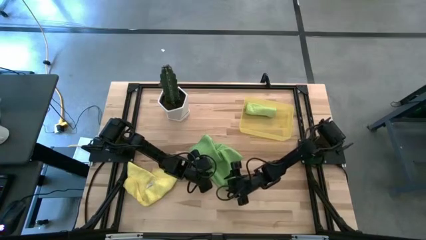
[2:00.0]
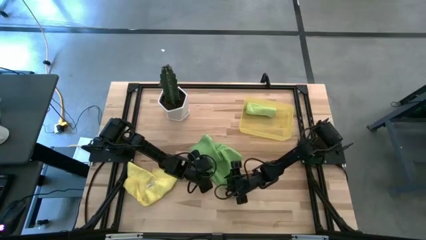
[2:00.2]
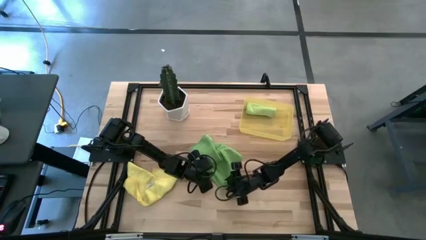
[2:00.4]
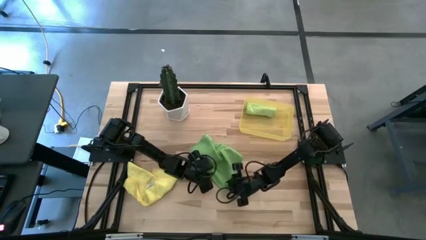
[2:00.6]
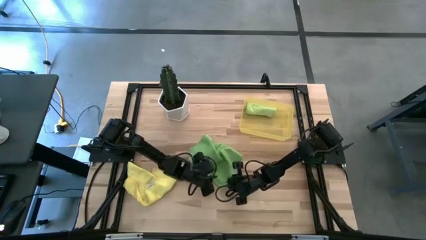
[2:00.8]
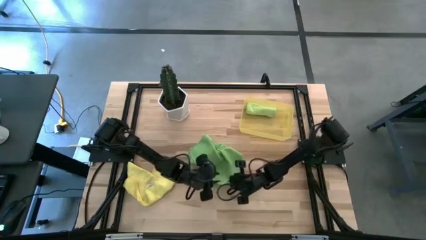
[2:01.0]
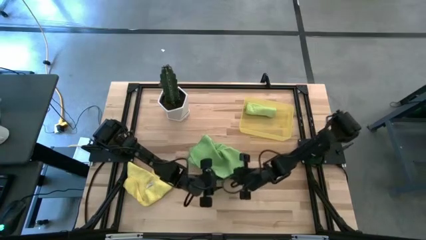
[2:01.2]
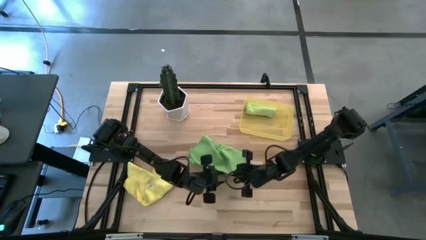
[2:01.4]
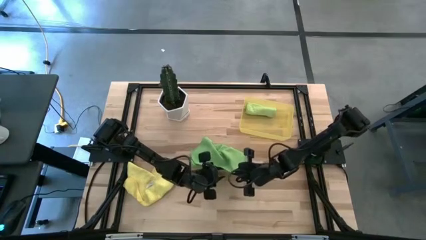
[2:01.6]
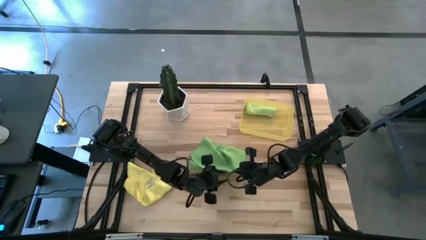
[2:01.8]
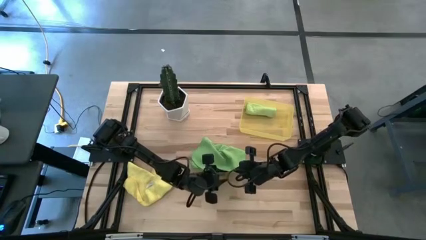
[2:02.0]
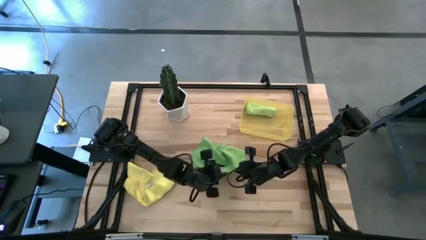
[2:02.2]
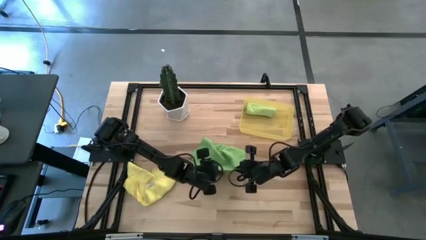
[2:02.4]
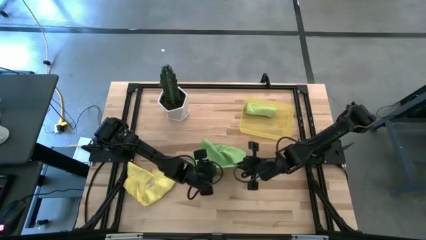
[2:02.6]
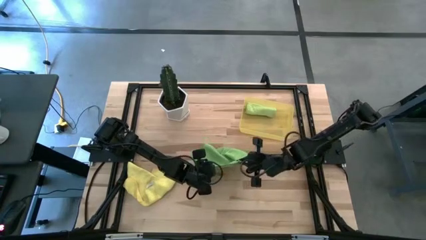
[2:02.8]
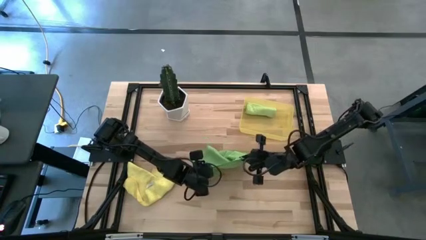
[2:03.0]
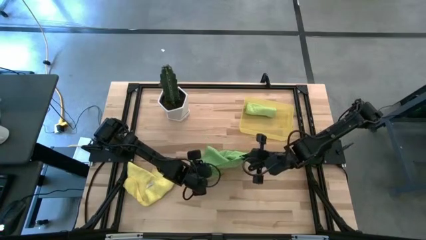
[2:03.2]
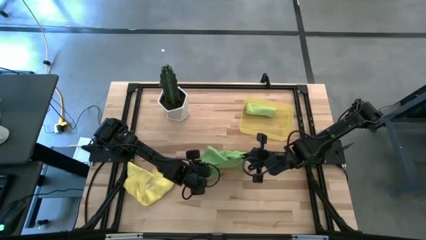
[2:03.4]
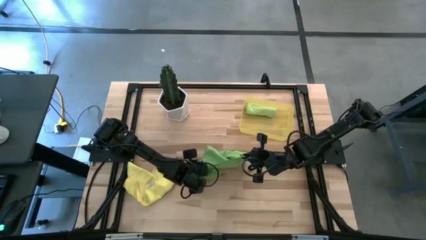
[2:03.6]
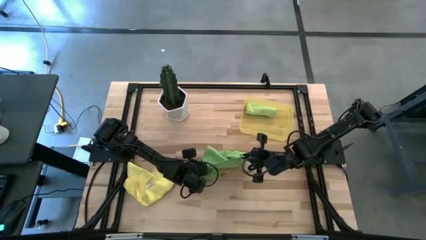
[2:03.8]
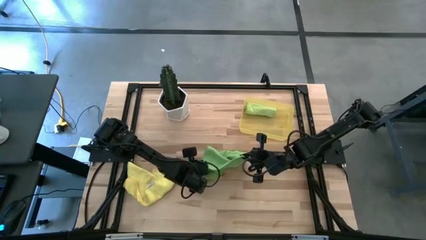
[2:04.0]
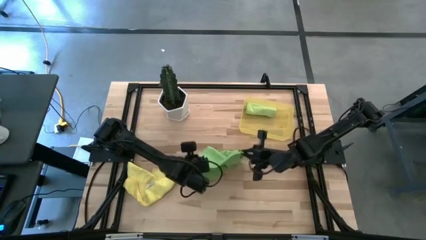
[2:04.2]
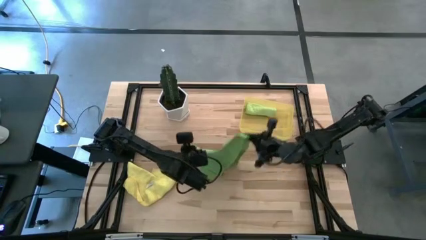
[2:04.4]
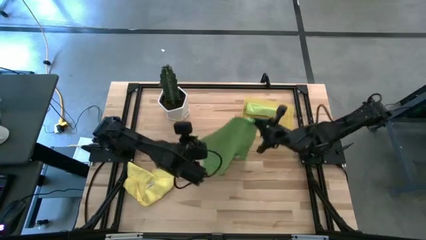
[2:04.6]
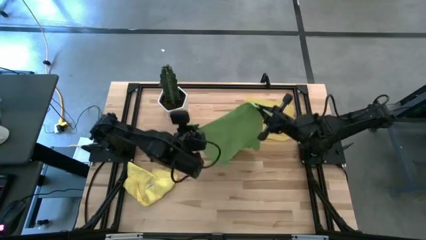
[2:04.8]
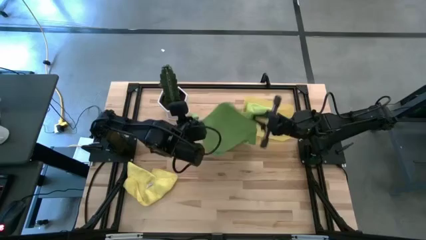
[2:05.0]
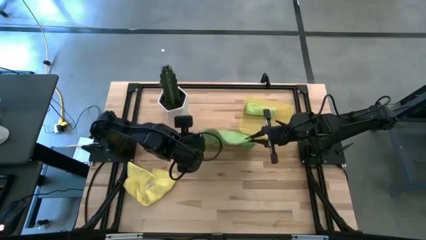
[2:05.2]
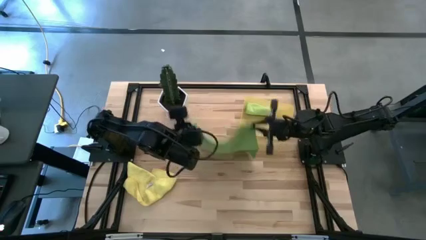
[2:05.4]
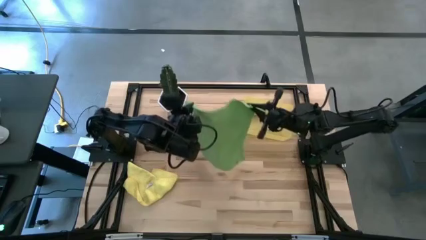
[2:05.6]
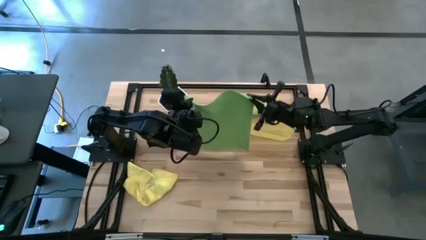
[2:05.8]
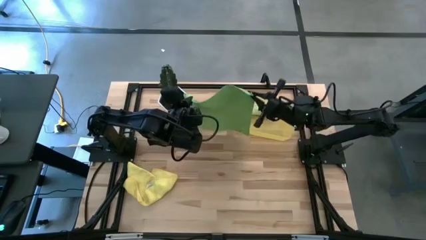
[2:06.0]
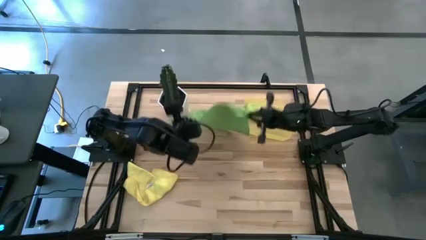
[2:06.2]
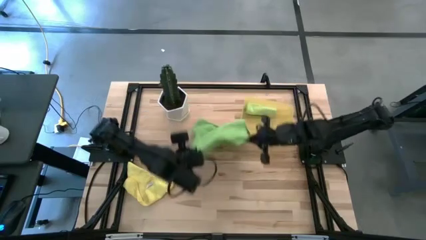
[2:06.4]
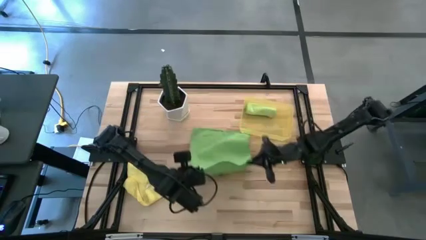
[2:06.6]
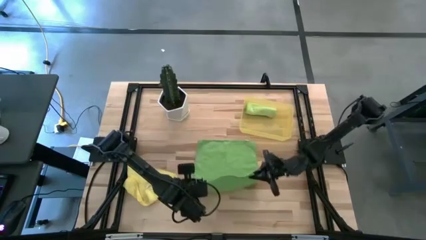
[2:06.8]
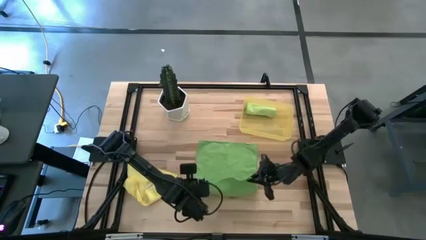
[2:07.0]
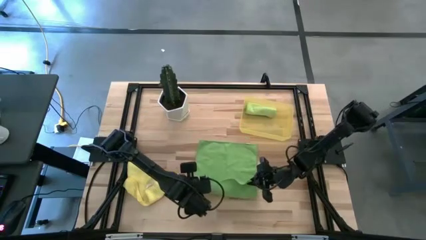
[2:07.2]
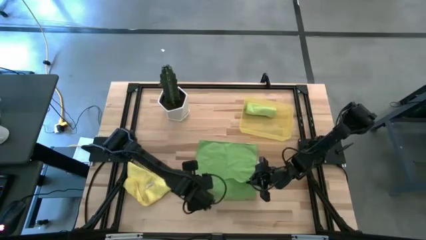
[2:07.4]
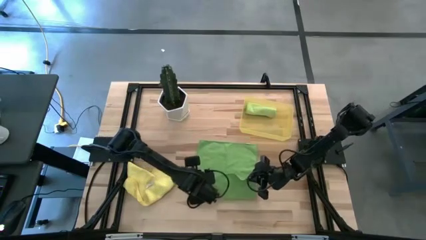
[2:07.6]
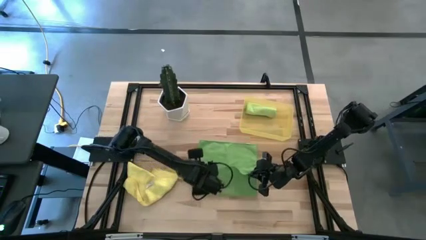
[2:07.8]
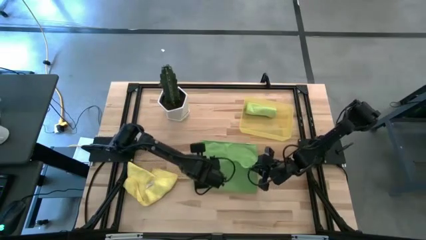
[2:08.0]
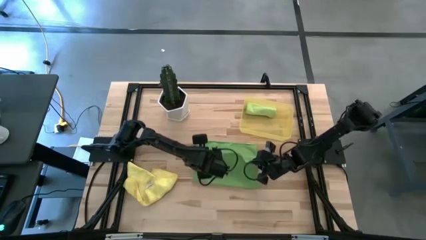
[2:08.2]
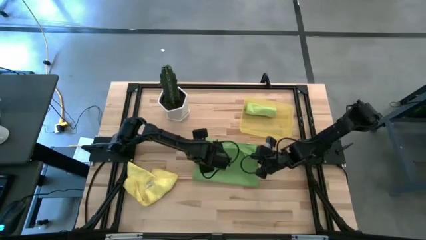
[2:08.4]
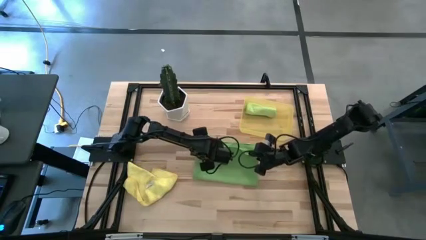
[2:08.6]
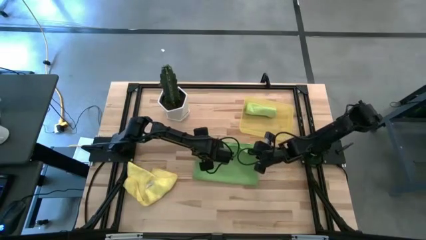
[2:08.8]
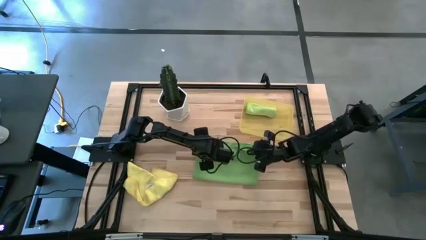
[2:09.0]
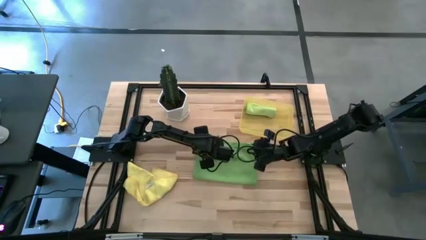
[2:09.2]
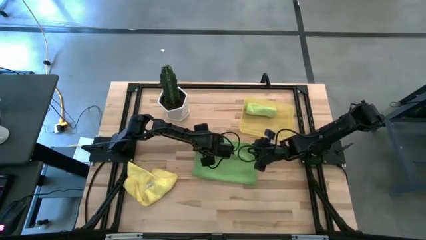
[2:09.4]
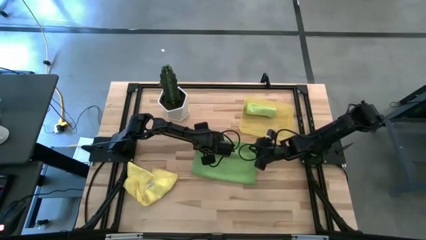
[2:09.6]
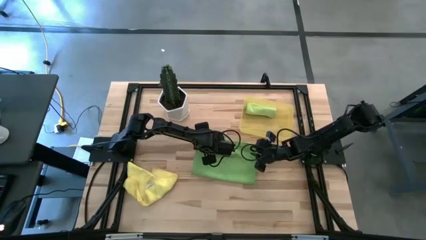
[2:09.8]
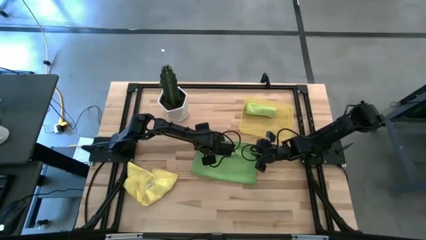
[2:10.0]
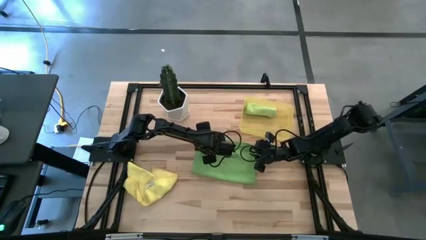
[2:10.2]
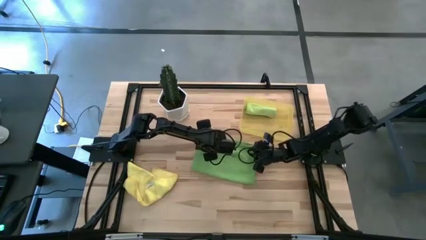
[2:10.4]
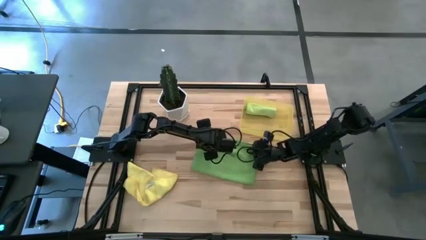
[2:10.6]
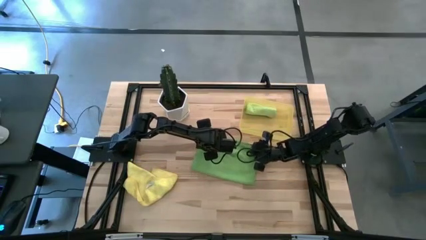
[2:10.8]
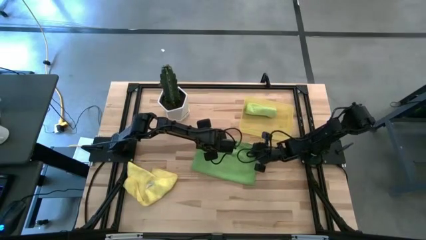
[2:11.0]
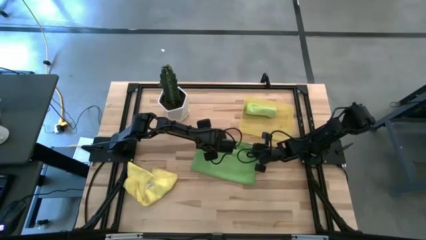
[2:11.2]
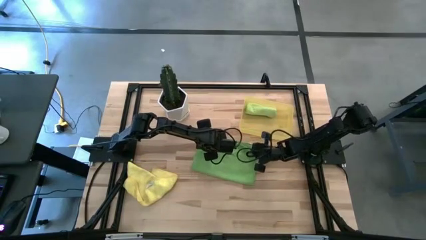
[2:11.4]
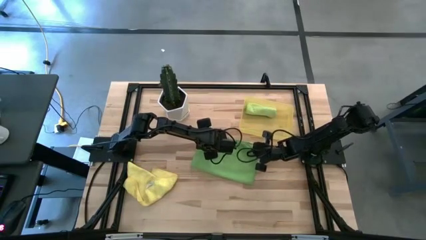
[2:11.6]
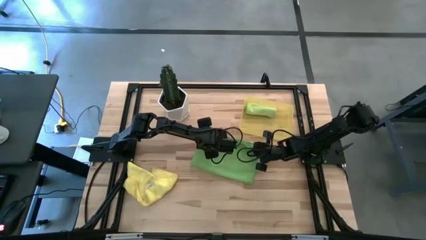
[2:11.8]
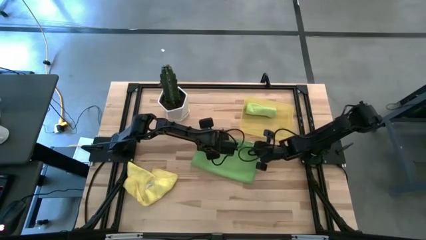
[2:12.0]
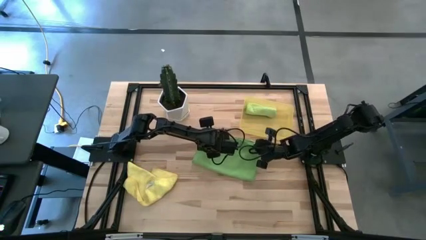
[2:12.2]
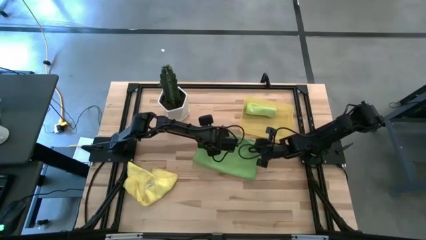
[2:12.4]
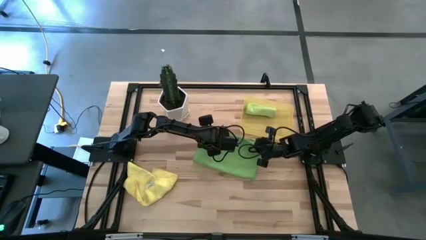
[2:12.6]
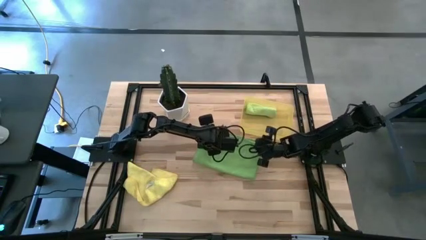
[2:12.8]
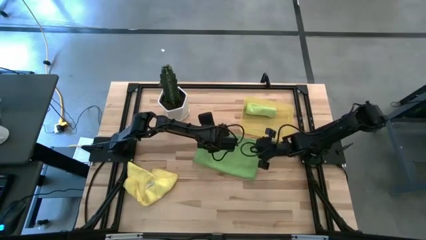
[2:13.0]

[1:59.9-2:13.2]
Task: Roll microfiber towels into tight, uniform cylinder then place into a basket
Fold the green microfiber cloth
